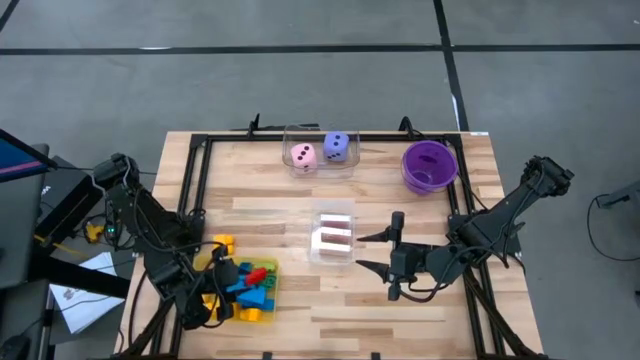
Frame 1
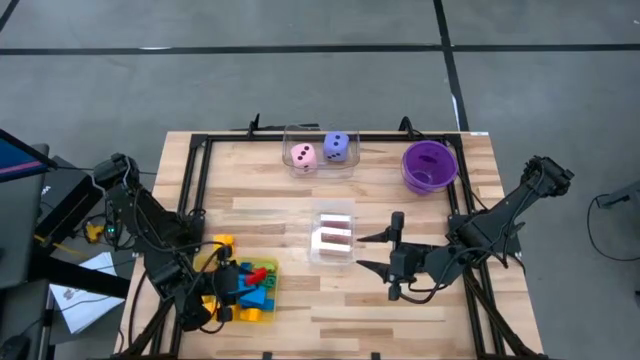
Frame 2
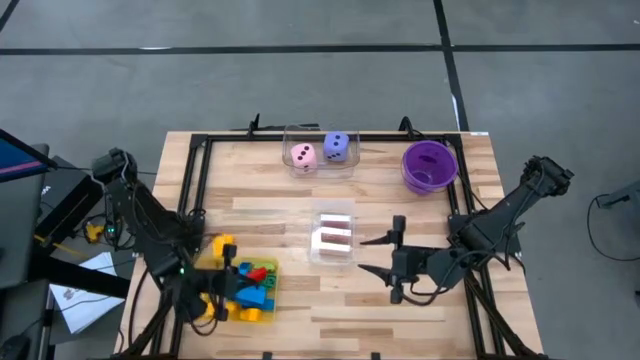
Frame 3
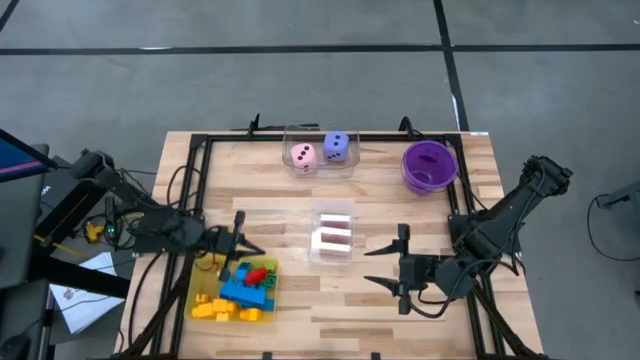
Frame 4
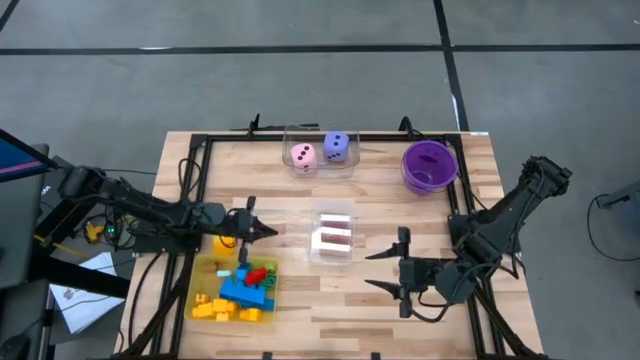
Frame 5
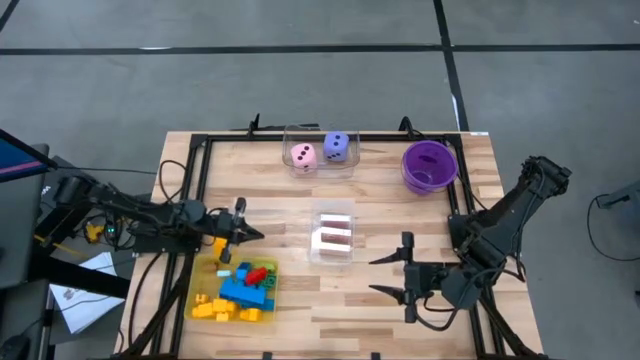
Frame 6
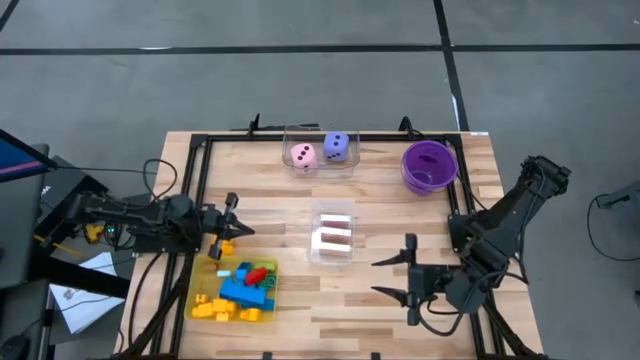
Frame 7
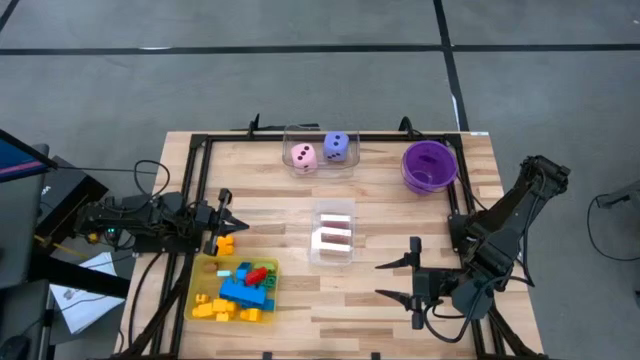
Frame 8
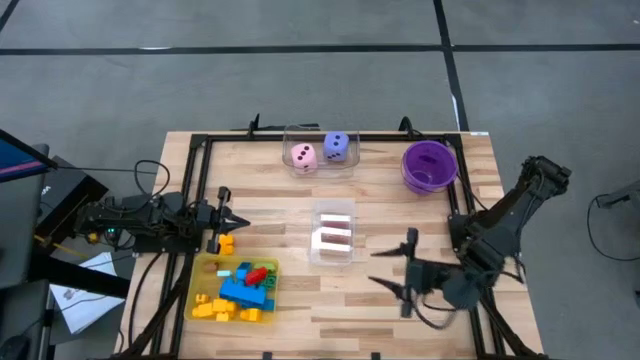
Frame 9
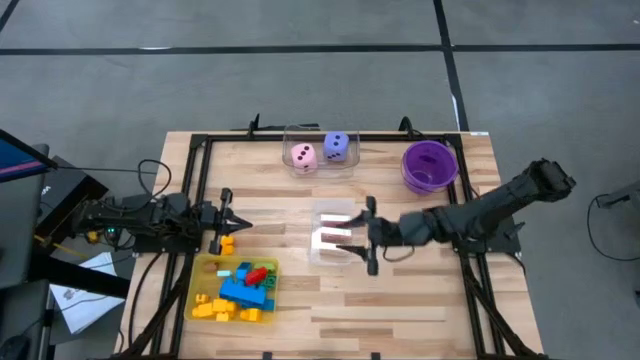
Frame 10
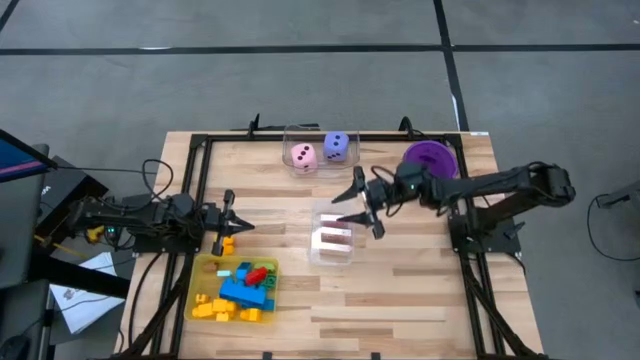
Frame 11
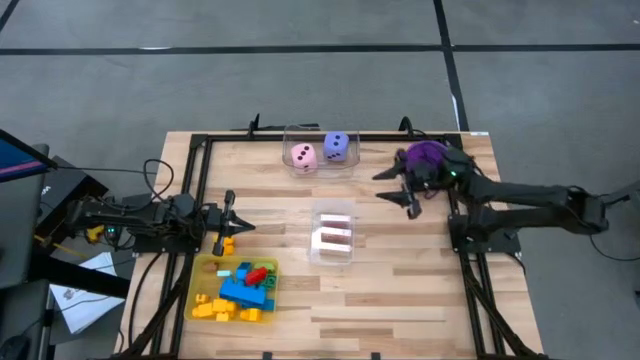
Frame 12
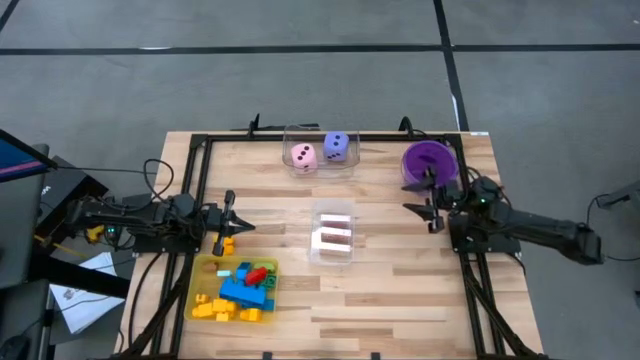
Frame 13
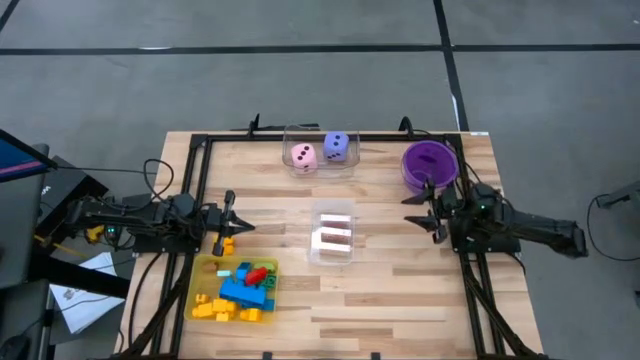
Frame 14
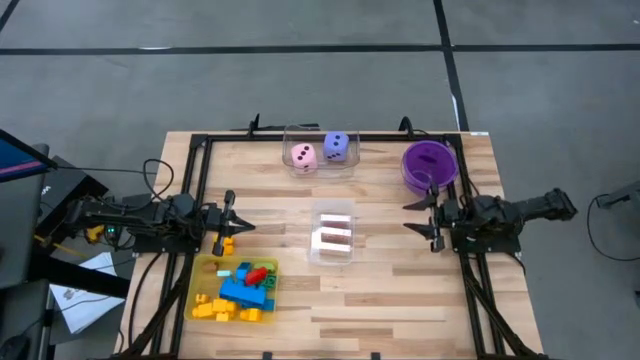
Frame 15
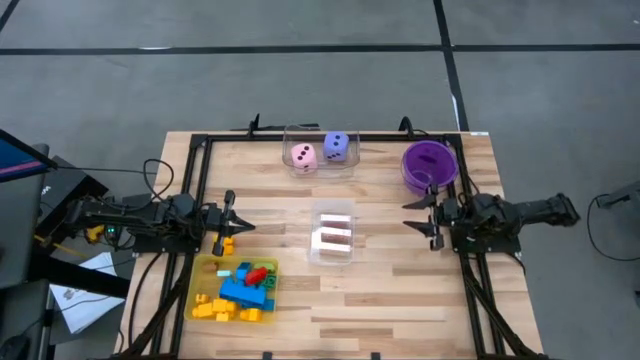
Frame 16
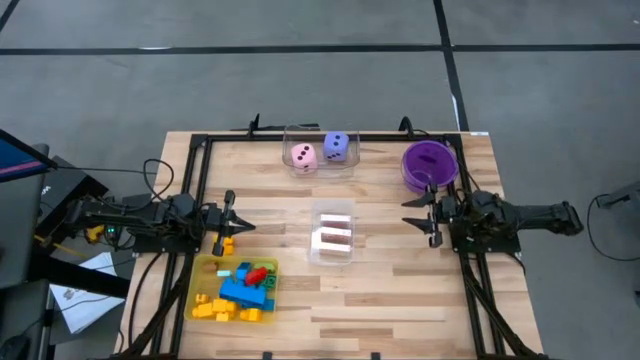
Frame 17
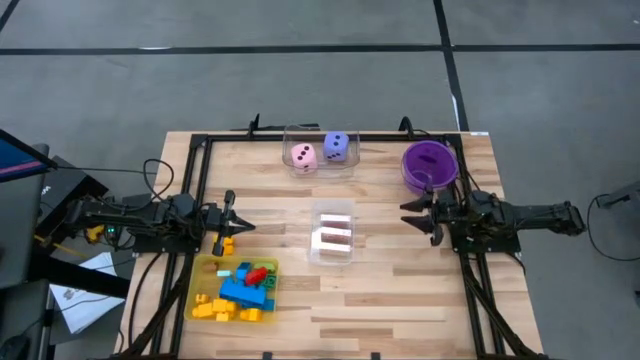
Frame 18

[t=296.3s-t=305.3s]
Task: Pick & Place Toys
Return to Home Position

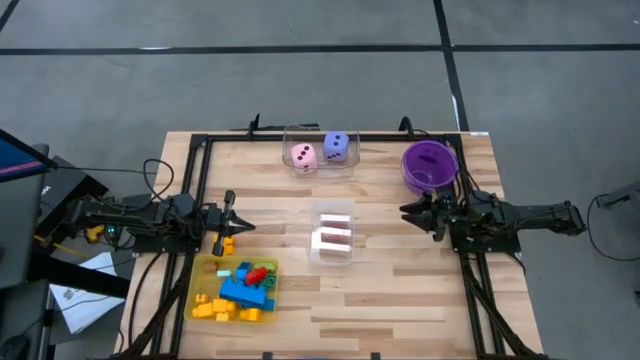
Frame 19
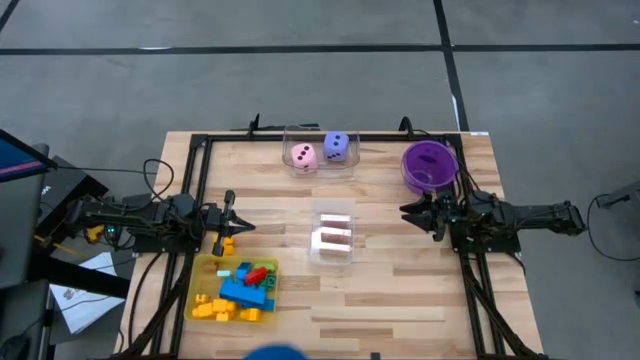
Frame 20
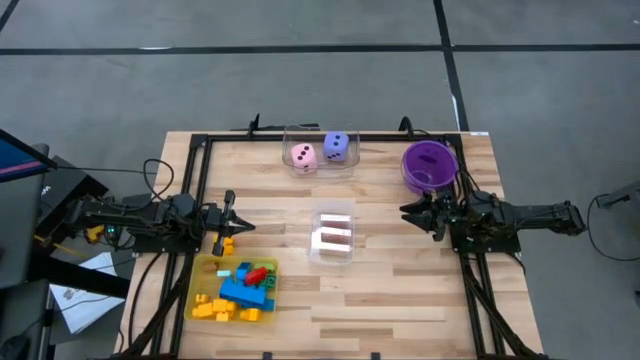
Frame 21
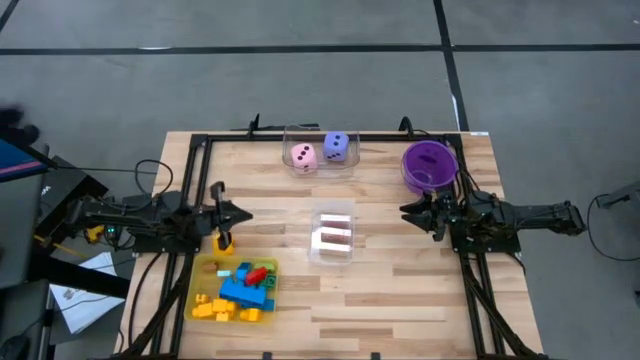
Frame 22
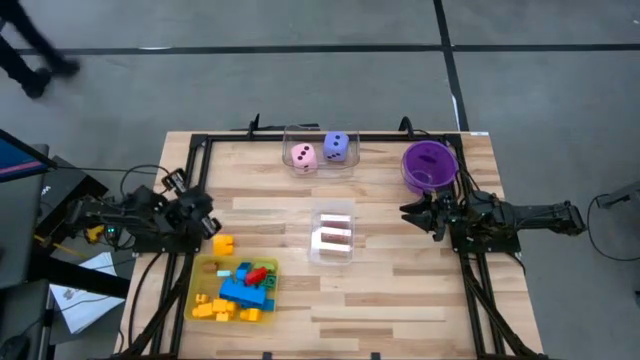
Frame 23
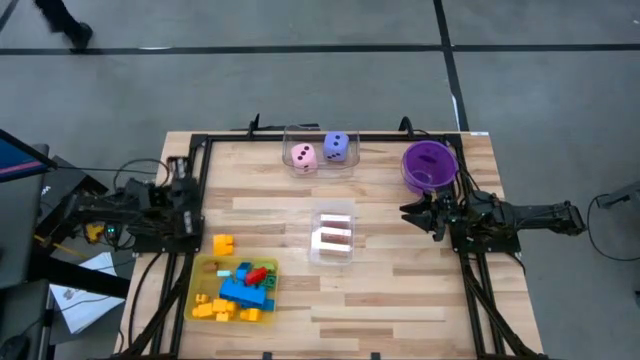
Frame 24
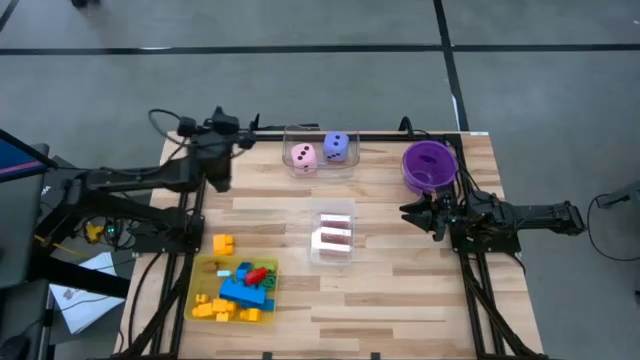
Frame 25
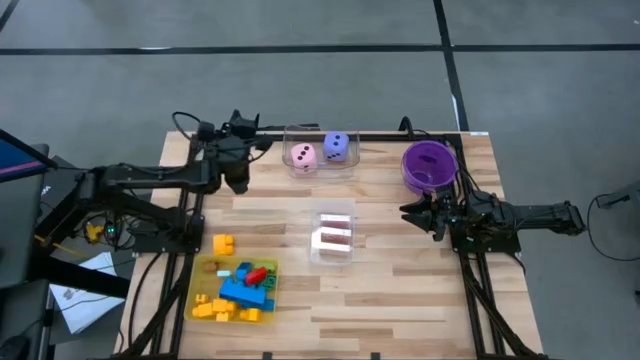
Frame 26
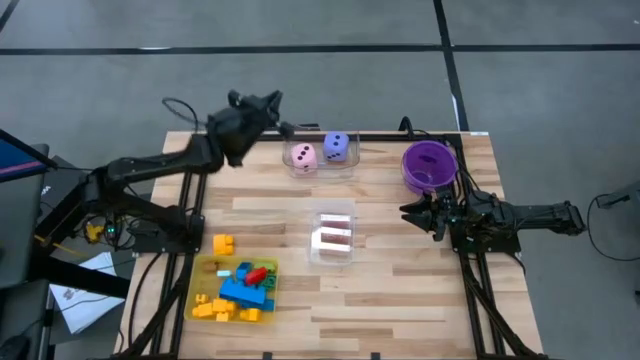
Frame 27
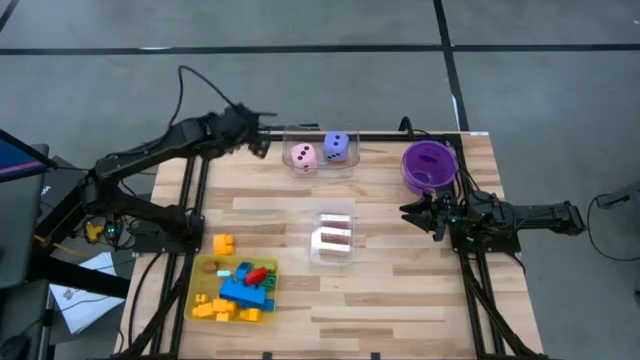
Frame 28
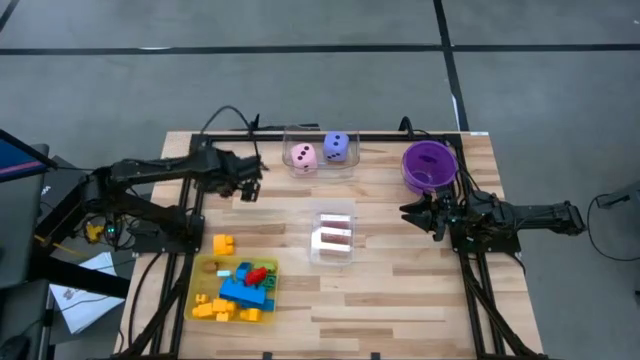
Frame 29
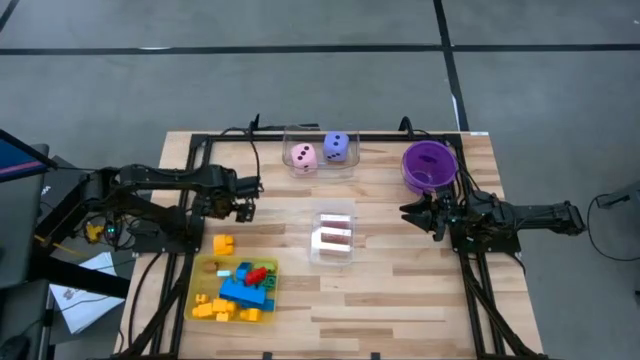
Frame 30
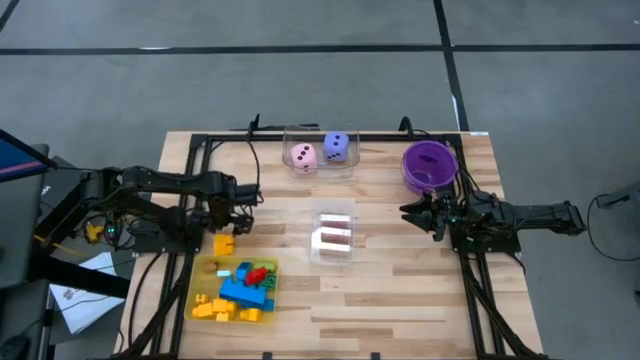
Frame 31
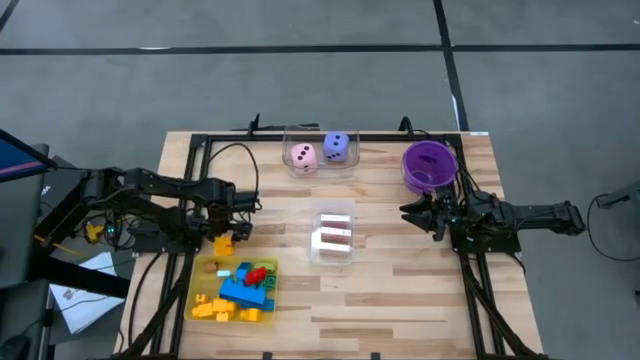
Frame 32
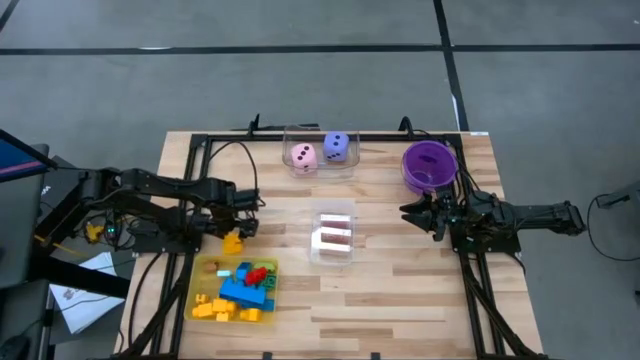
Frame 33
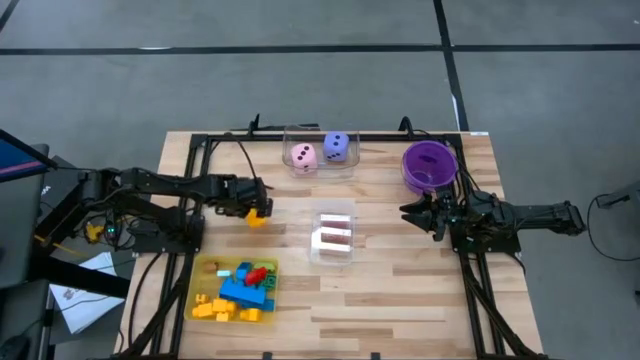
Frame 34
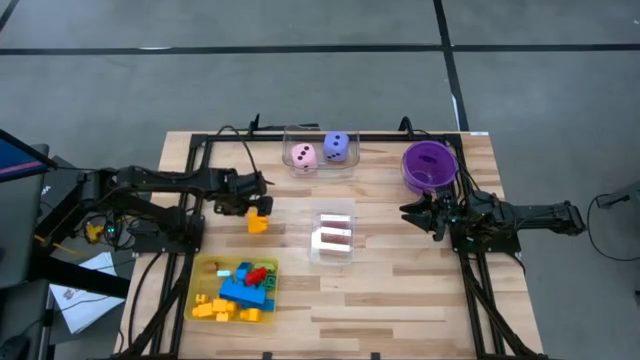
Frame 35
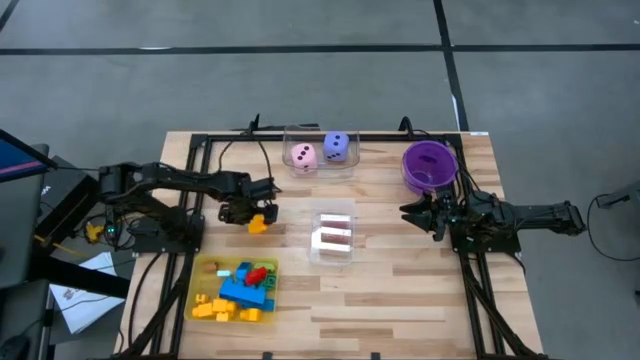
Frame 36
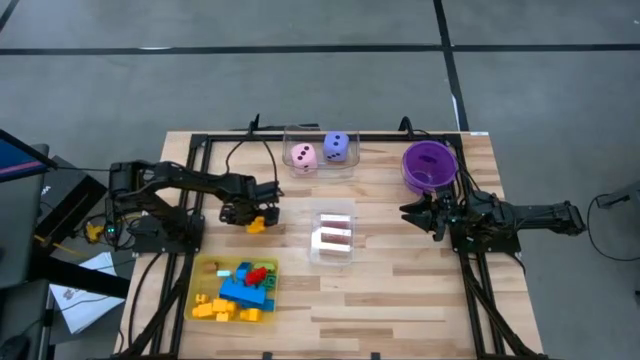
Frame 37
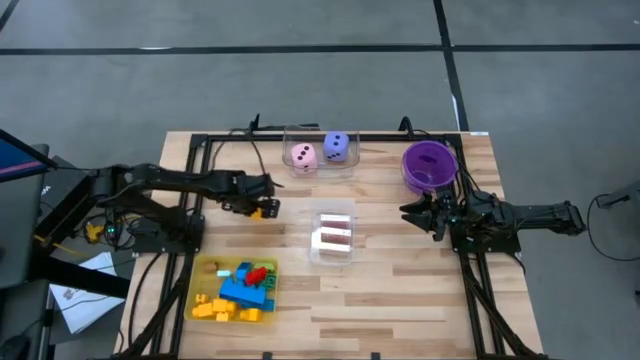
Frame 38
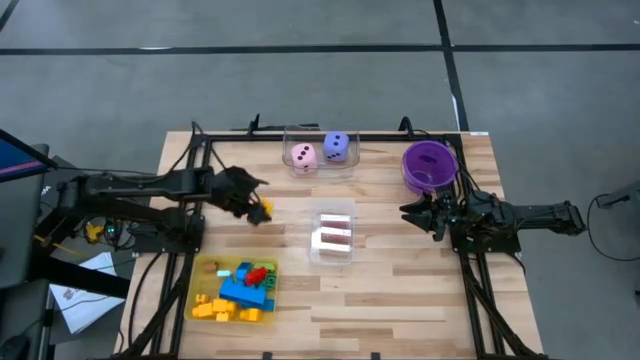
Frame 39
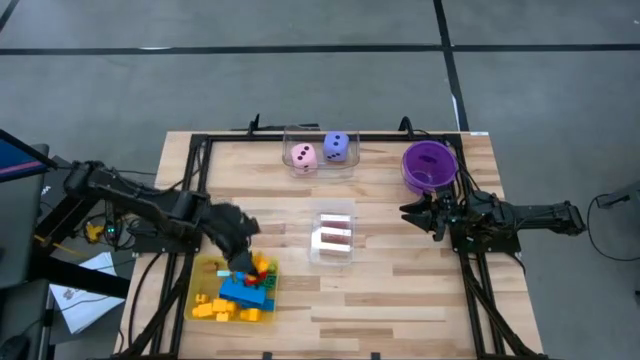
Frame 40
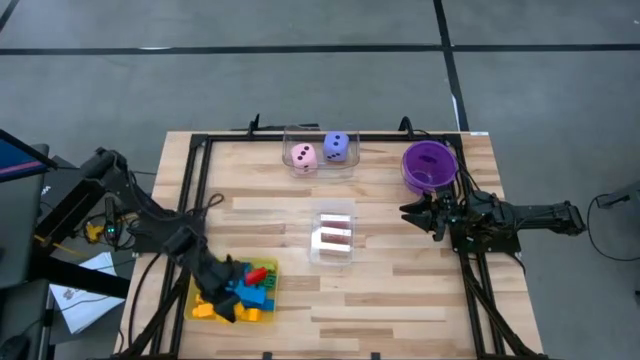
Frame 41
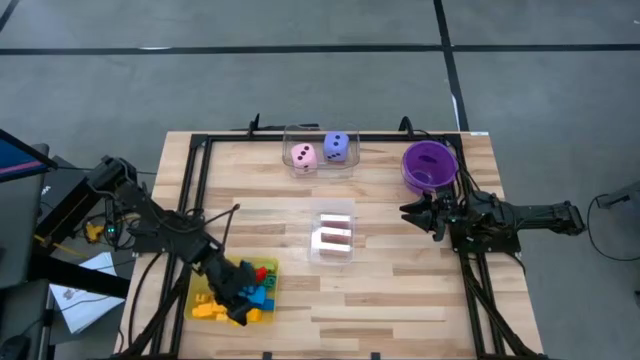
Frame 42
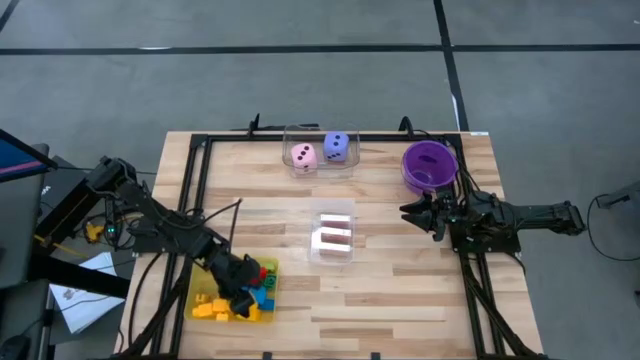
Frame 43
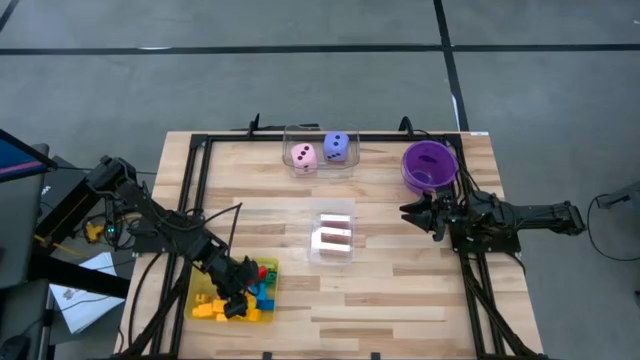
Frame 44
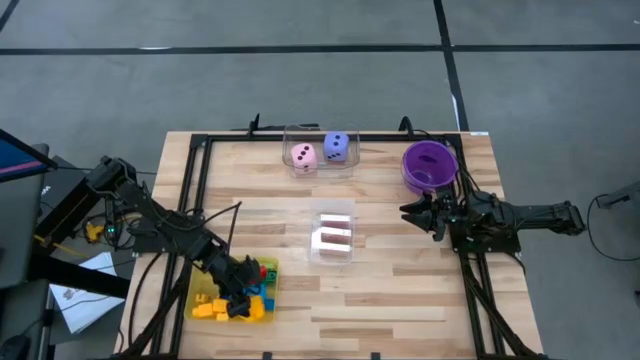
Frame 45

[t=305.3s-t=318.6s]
Put the yellow game piece into the yellow bin
